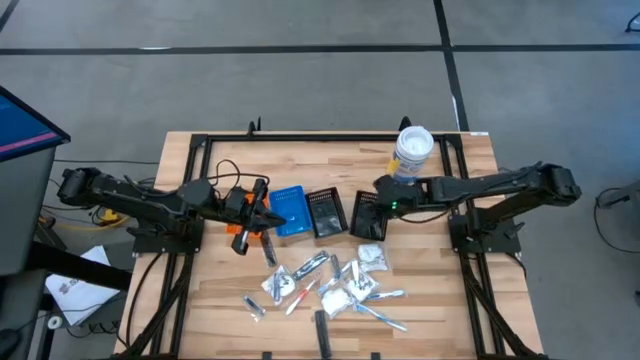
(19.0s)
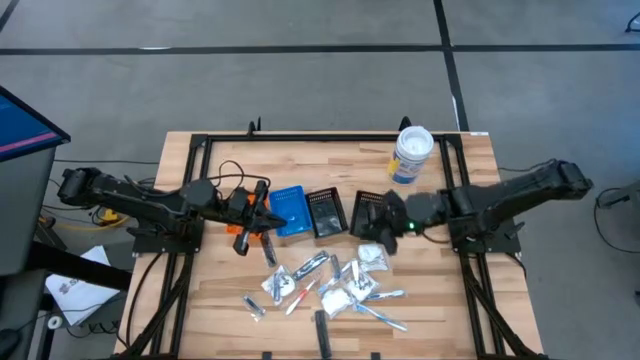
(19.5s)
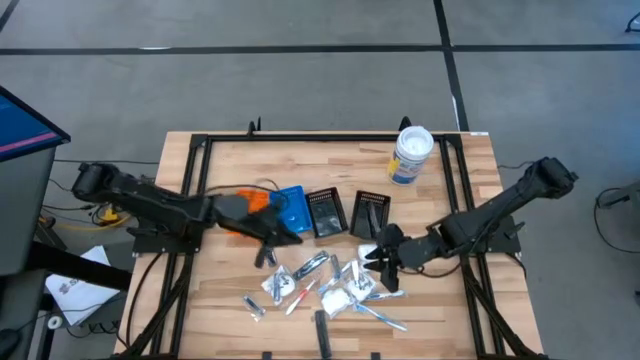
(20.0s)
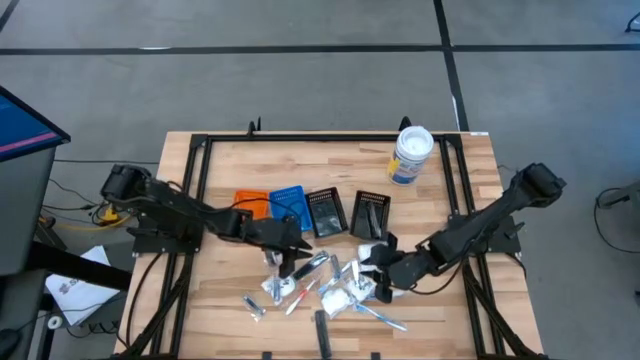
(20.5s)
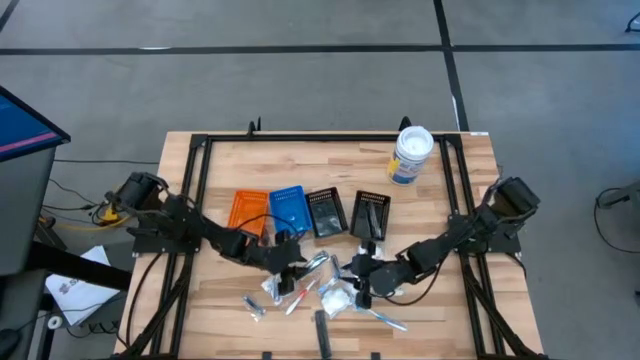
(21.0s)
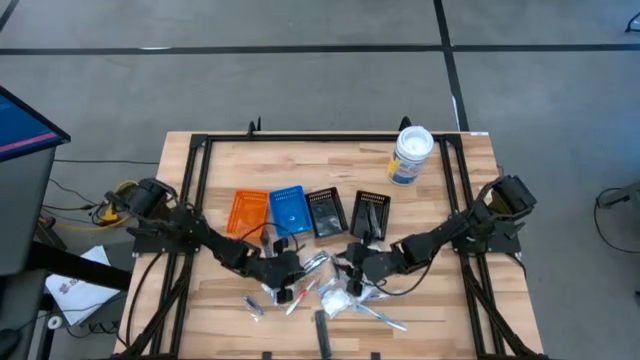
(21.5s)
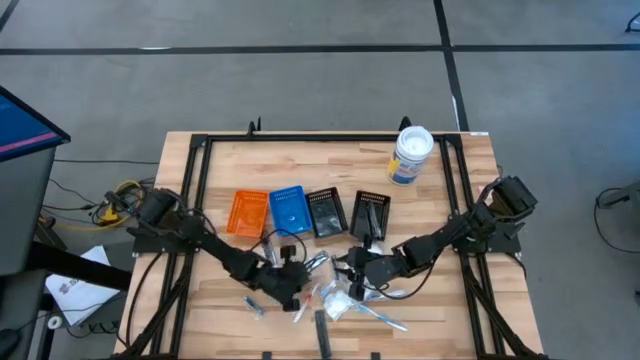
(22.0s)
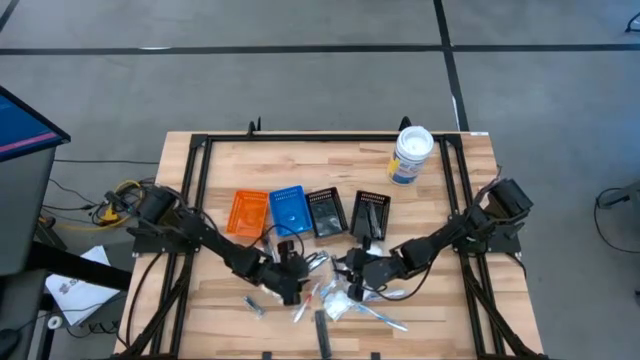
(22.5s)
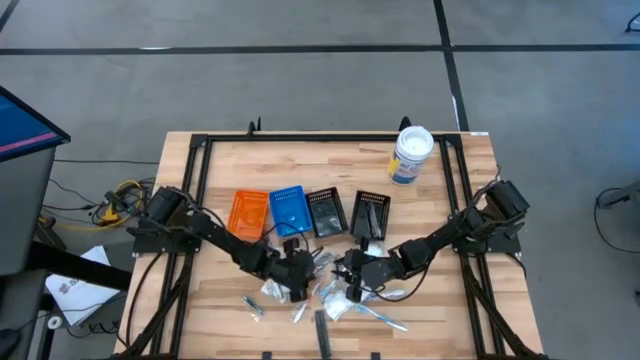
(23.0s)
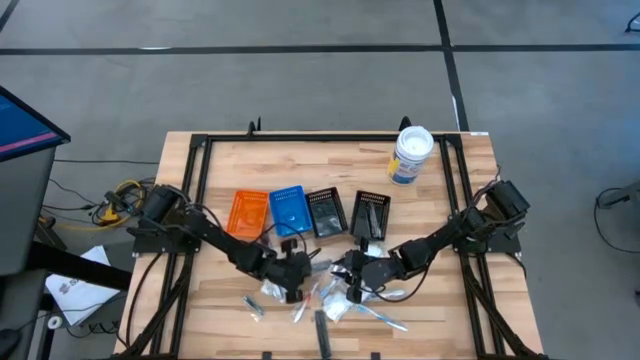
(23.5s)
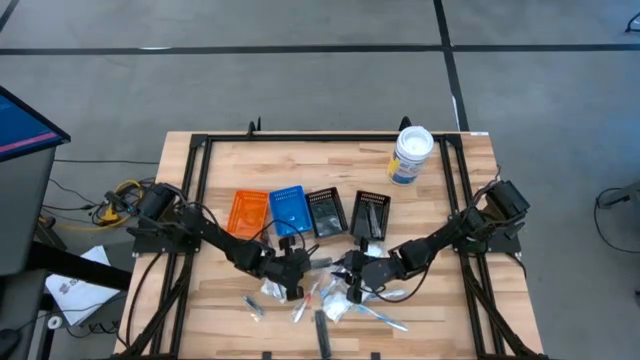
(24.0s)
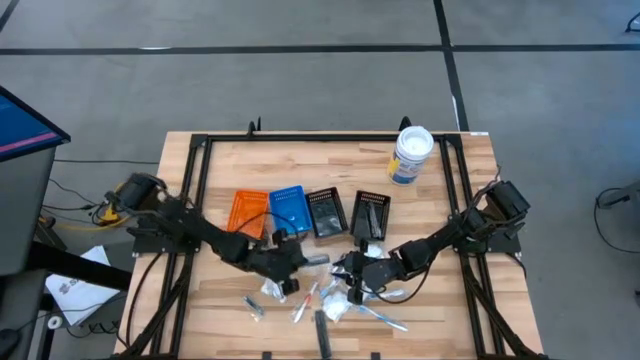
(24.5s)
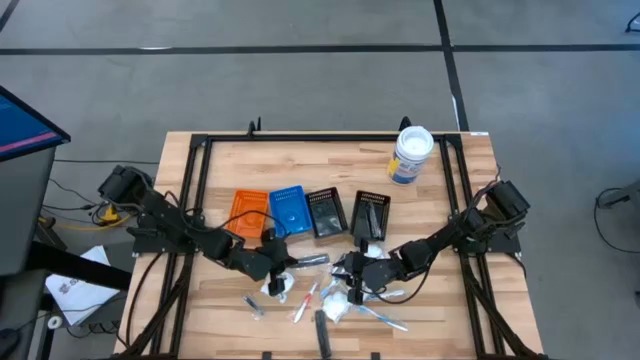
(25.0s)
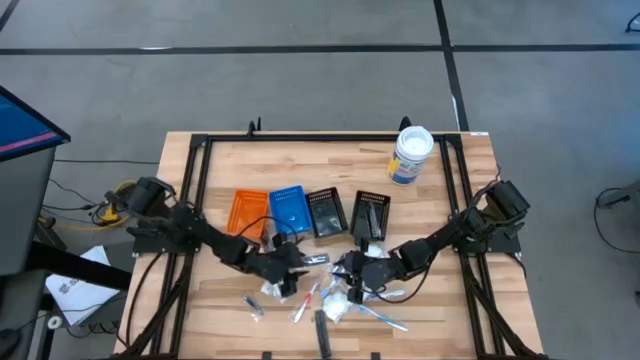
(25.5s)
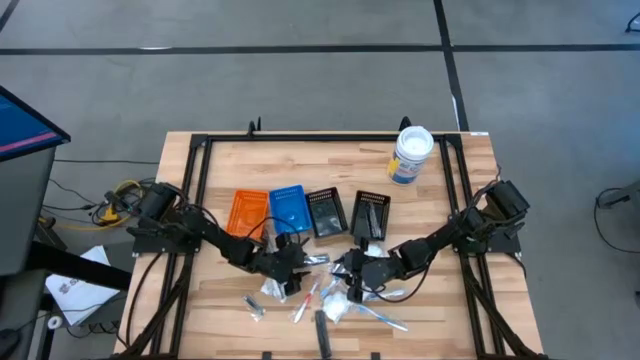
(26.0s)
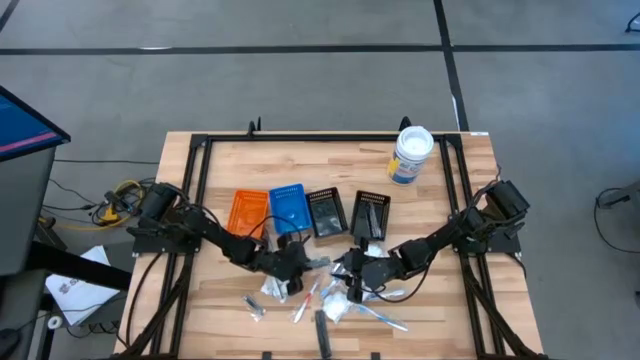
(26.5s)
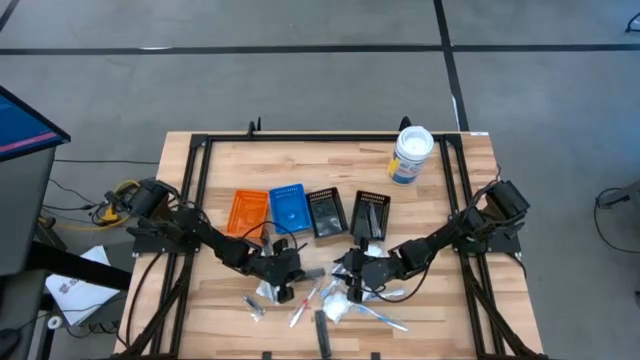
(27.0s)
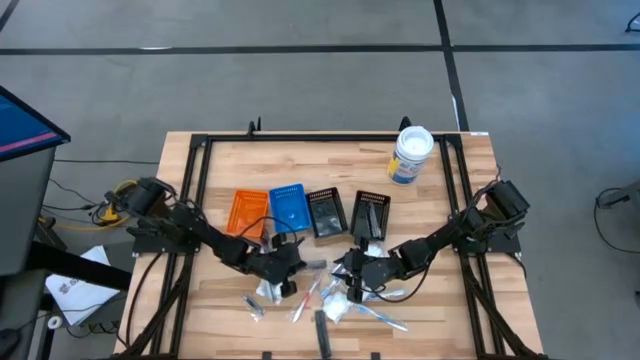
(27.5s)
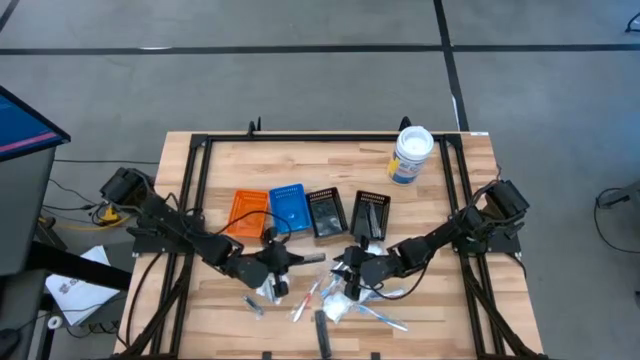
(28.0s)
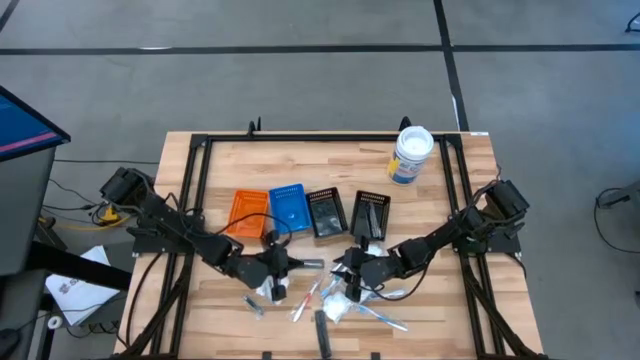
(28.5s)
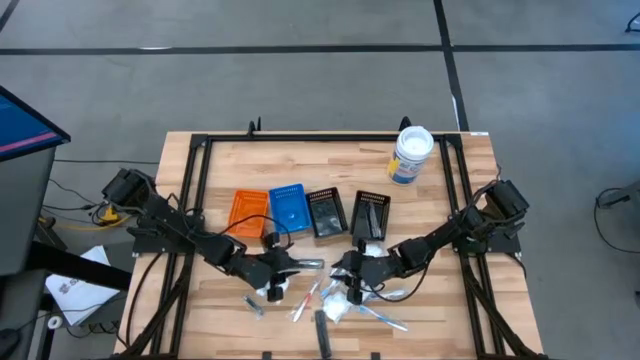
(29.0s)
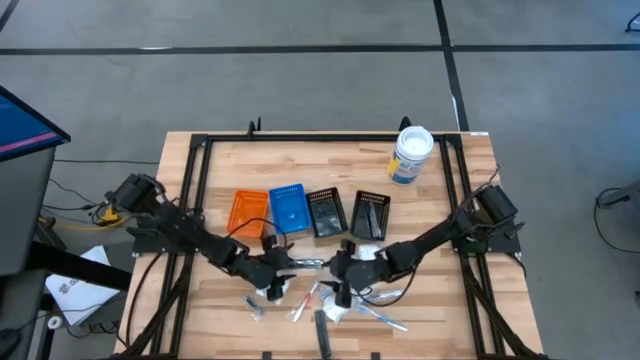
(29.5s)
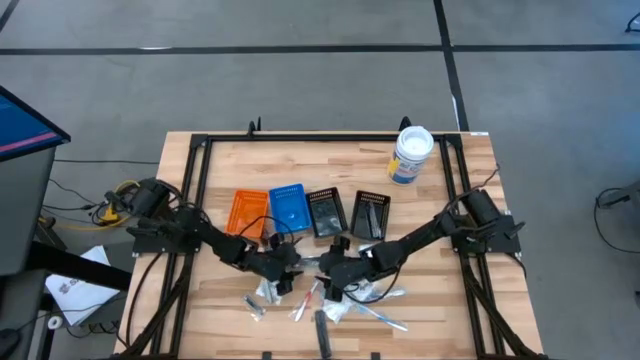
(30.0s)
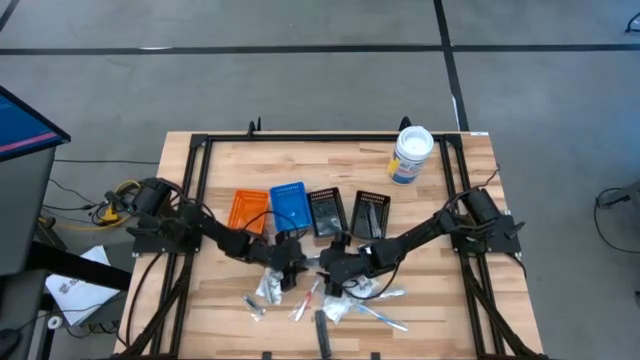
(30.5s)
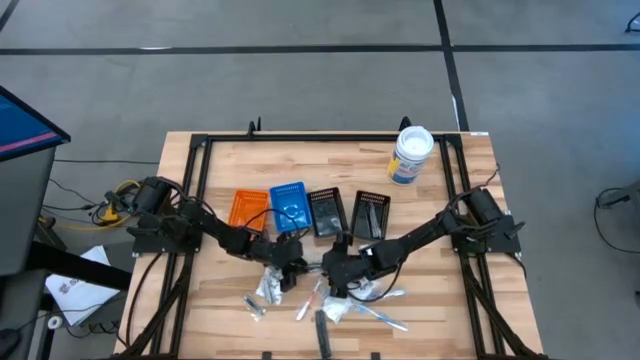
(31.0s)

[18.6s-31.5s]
Task: Pick & Place Travel size toiletries
Put the black comb into the right black bin

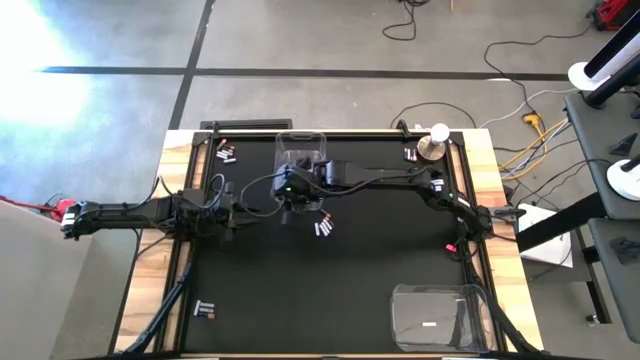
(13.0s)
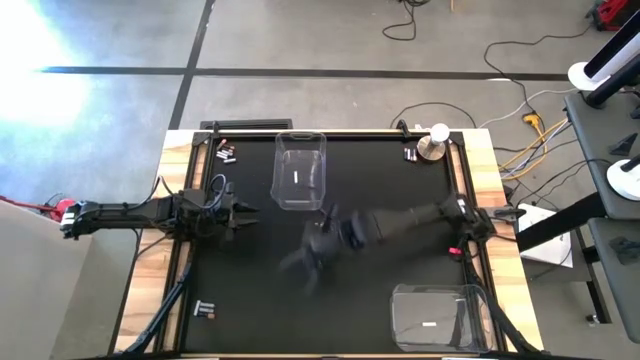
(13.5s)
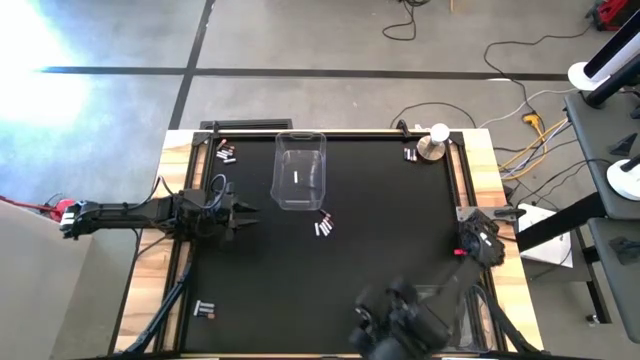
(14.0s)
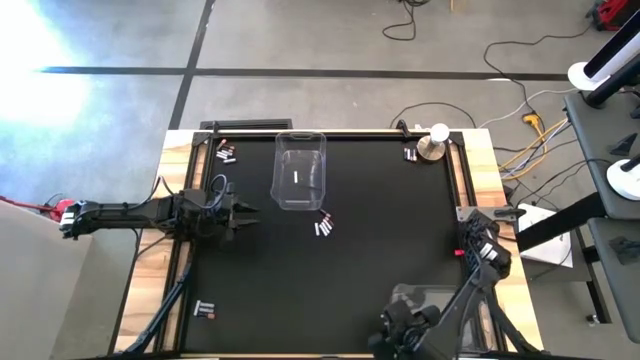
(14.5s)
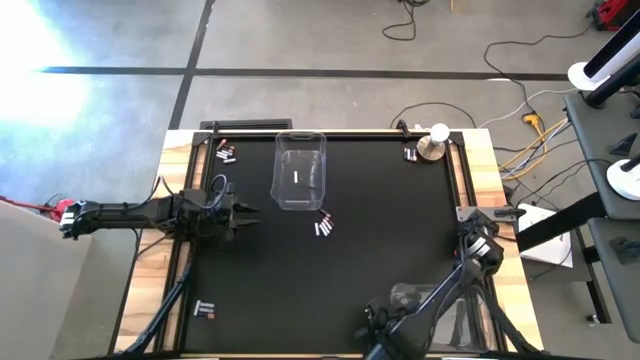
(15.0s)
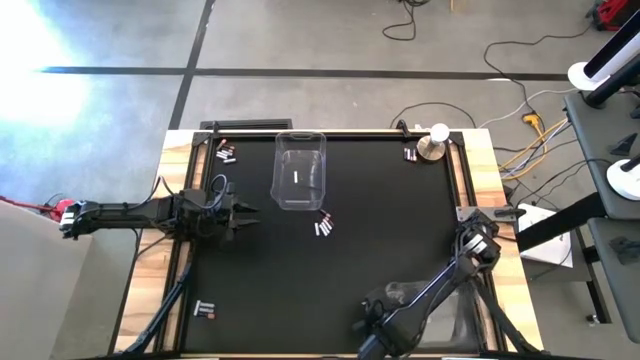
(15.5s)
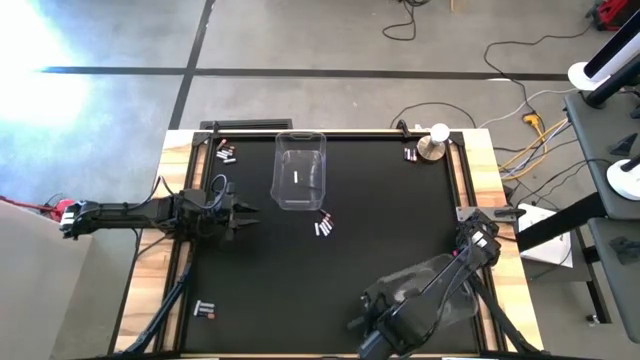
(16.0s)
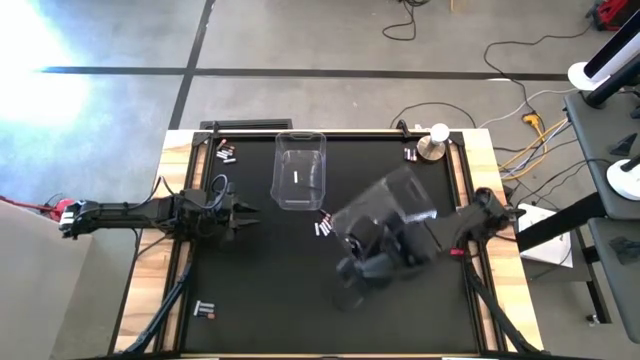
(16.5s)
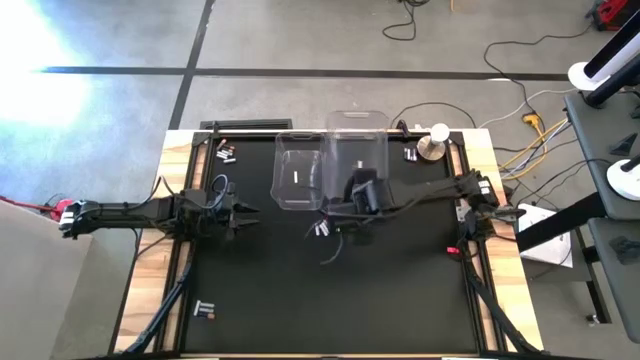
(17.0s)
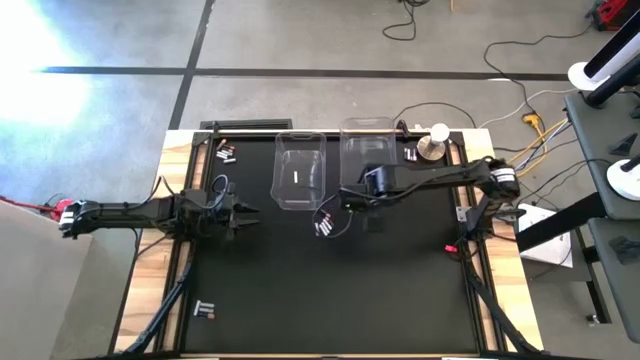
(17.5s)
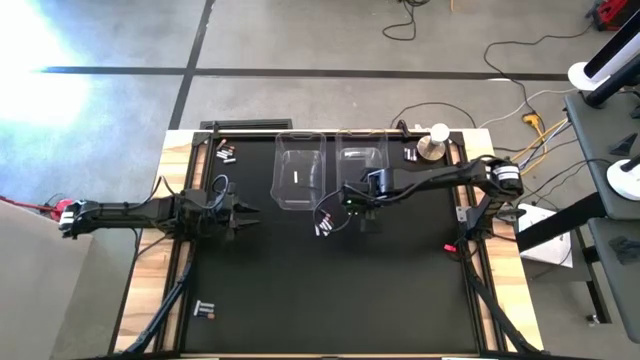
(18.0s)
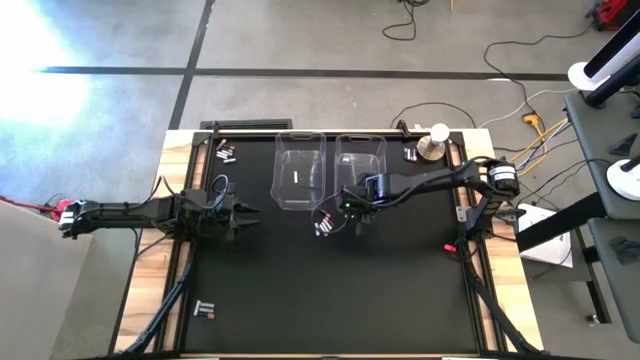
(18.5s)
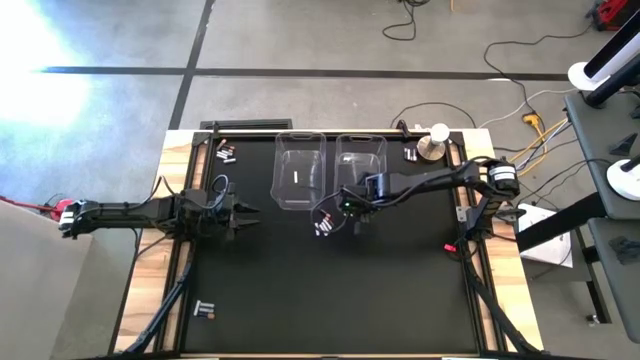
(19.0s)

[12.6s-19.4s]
Task: Sort batteries
Move the bottom transparent bin beside the top left transparent bin
